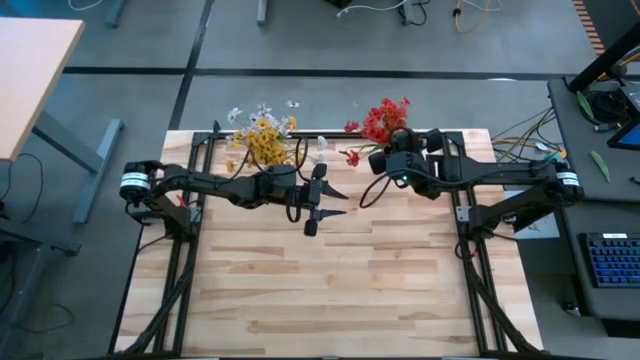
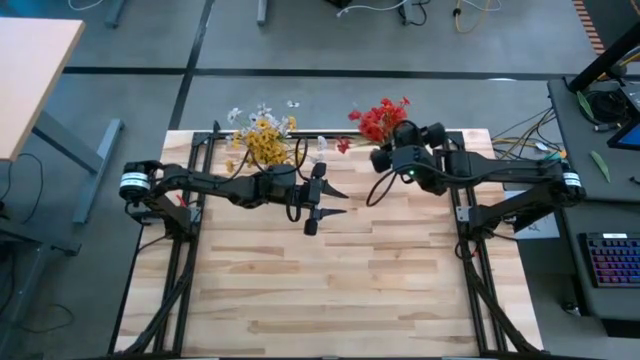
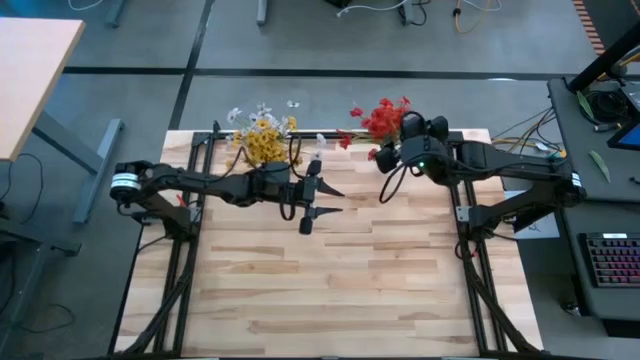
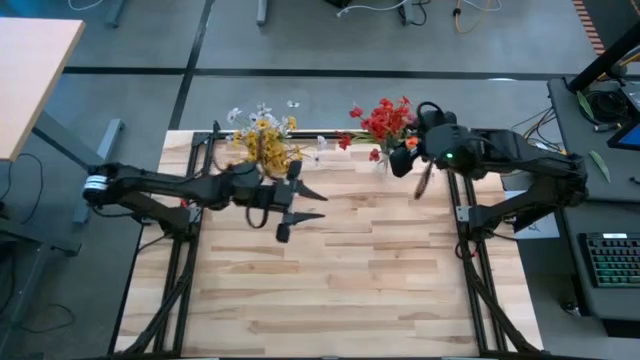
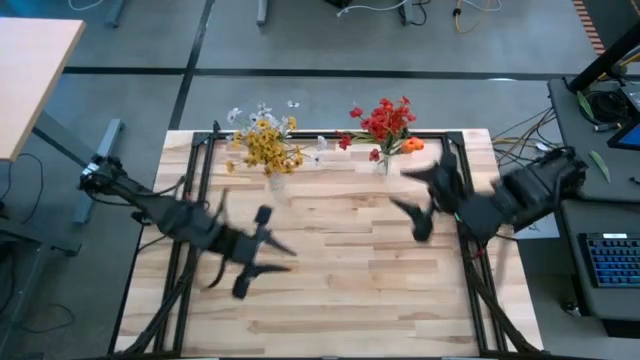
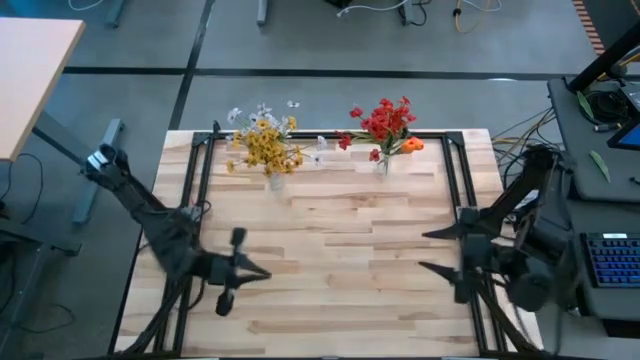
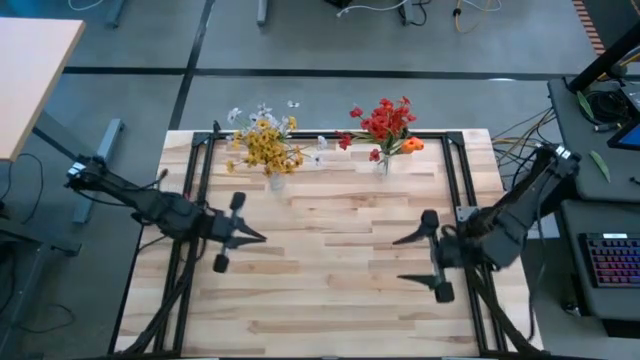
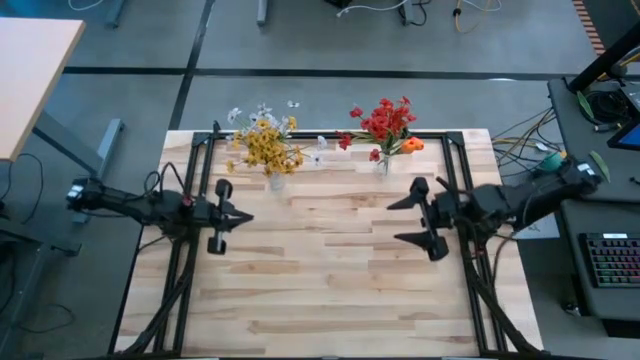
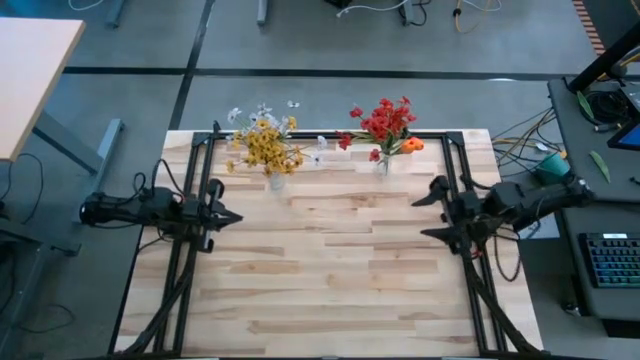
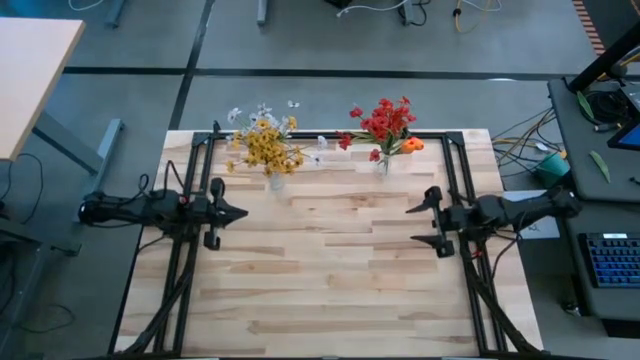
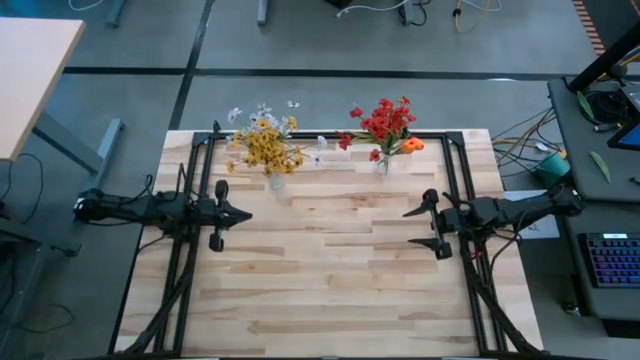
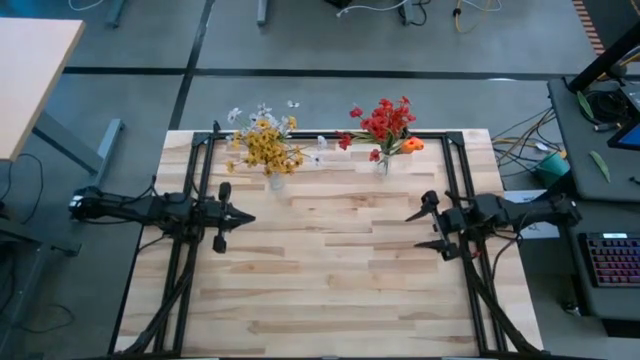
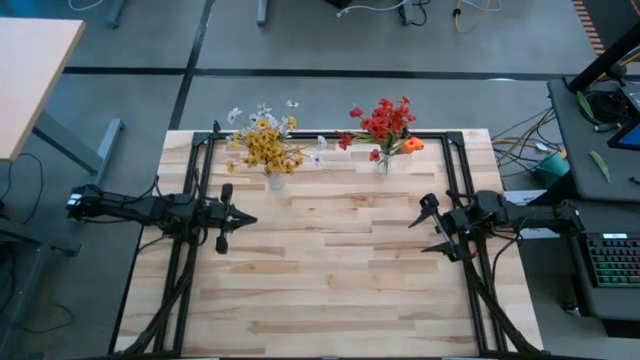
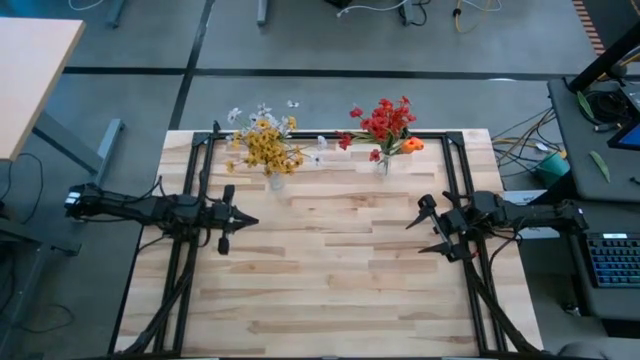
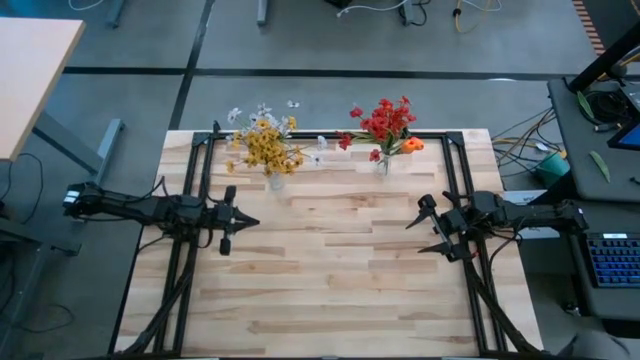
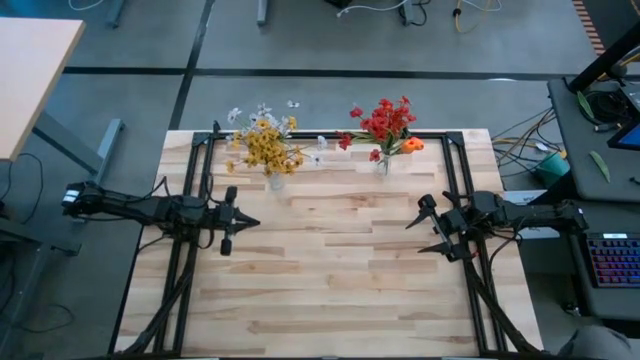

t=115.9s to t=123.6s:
Task: Sort flowers into vase by color
Return to Home Position

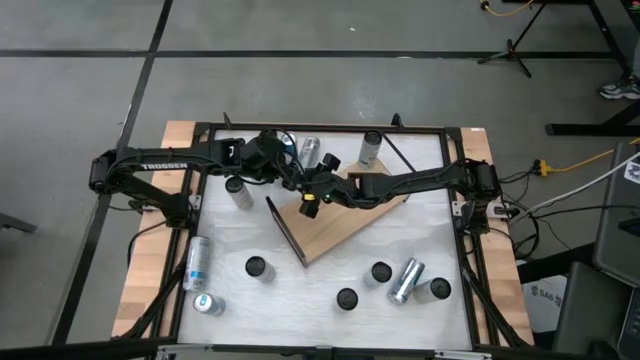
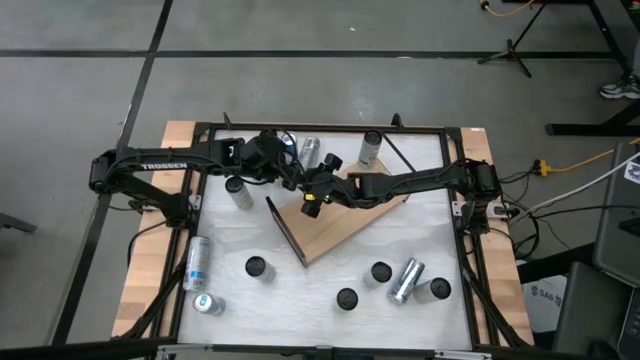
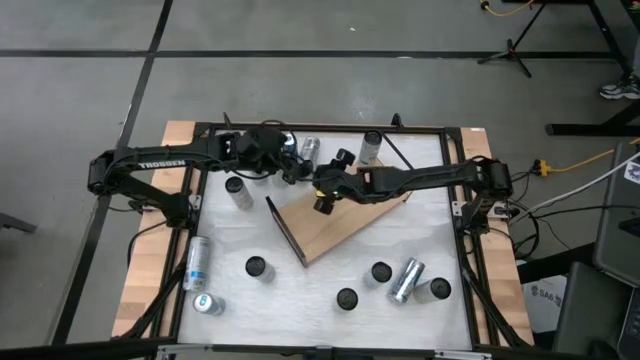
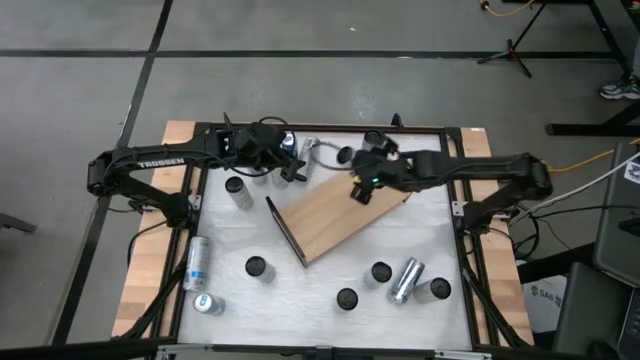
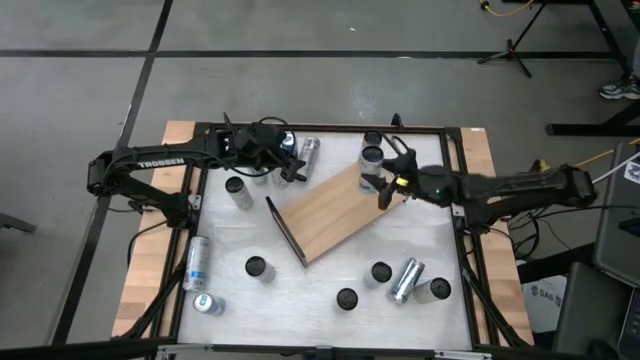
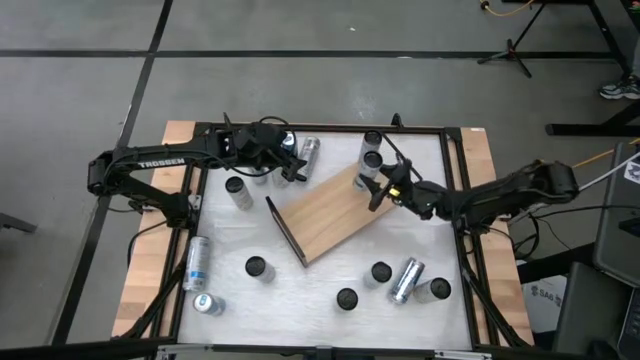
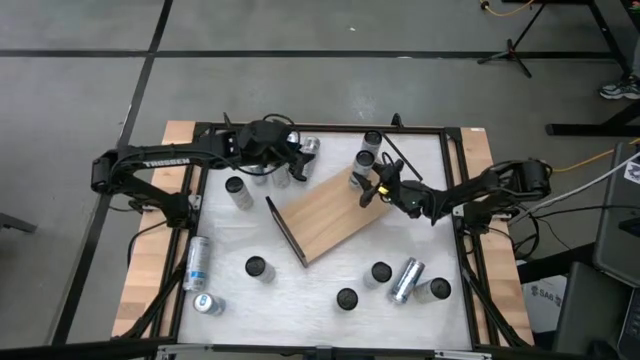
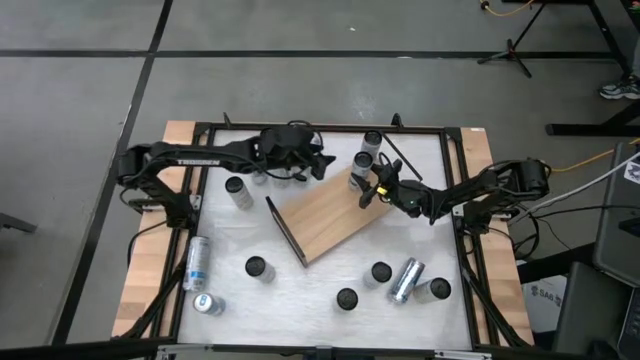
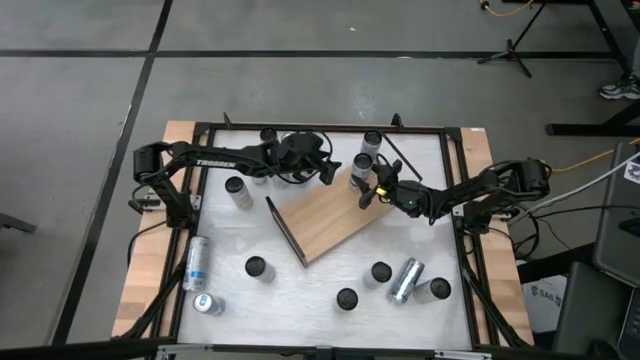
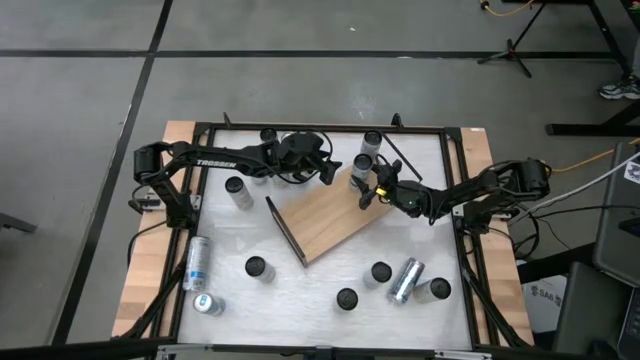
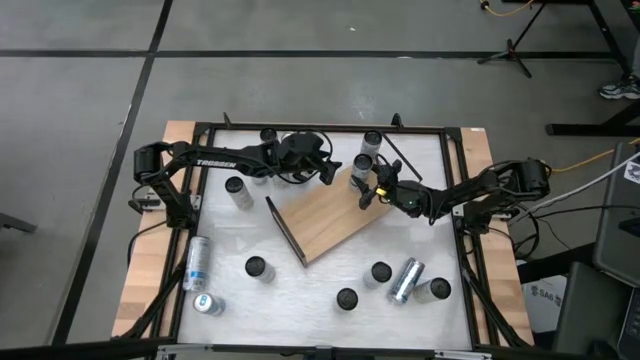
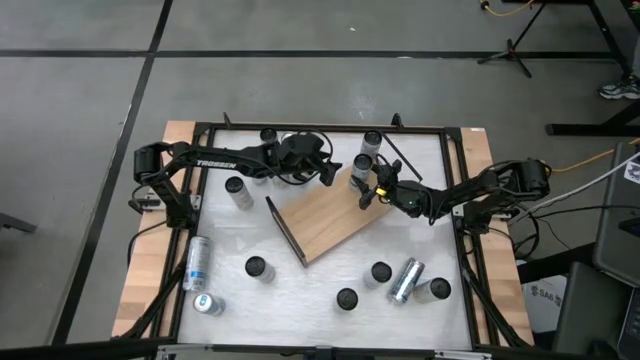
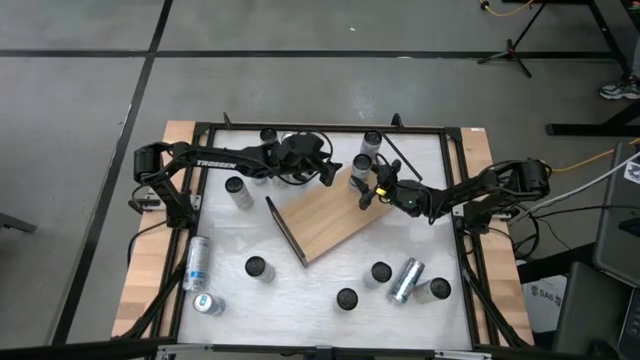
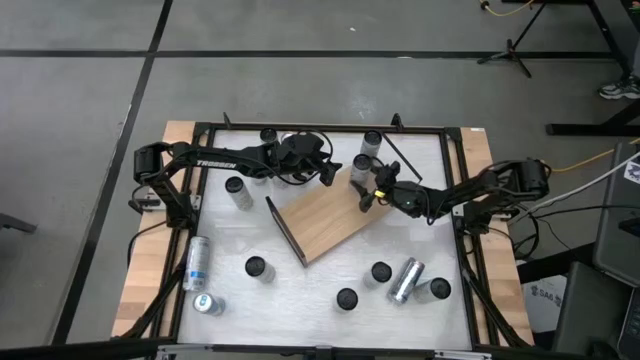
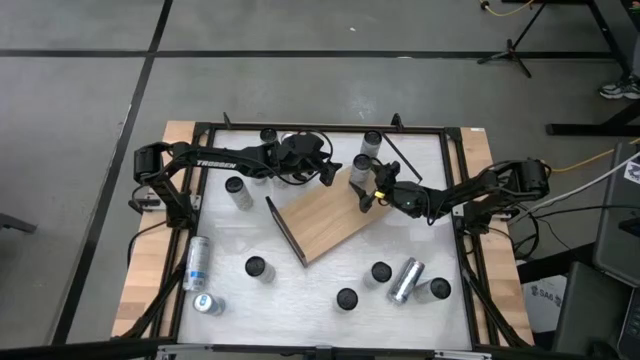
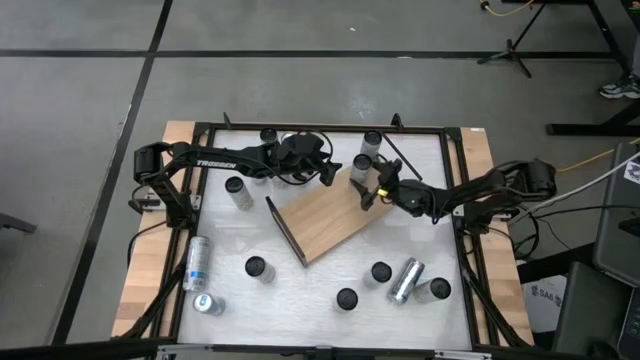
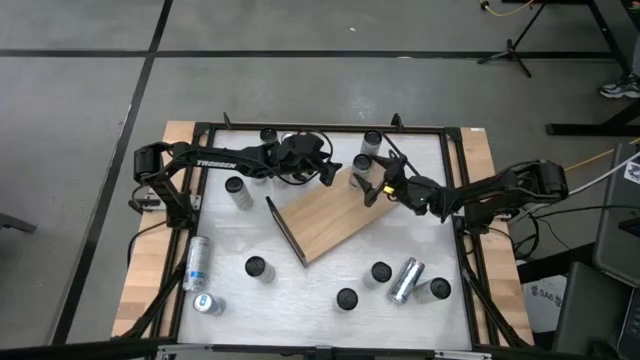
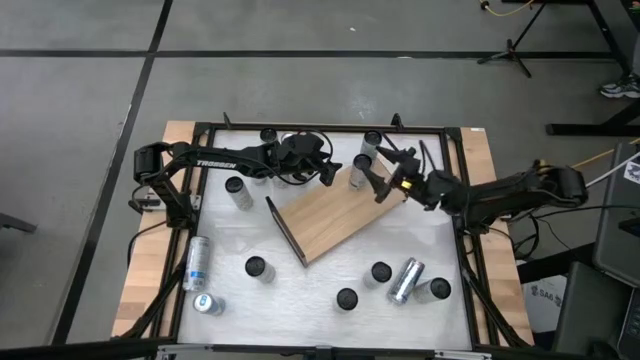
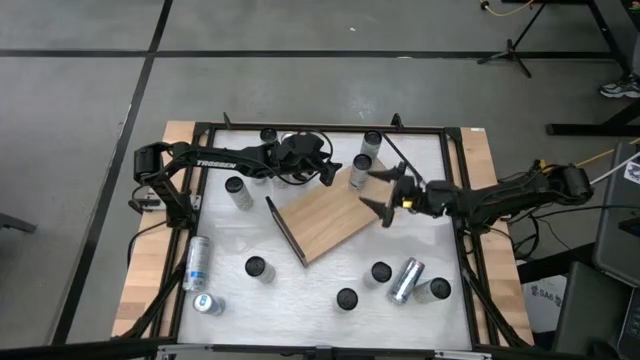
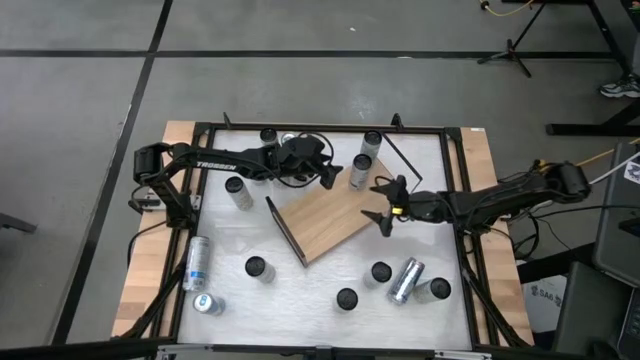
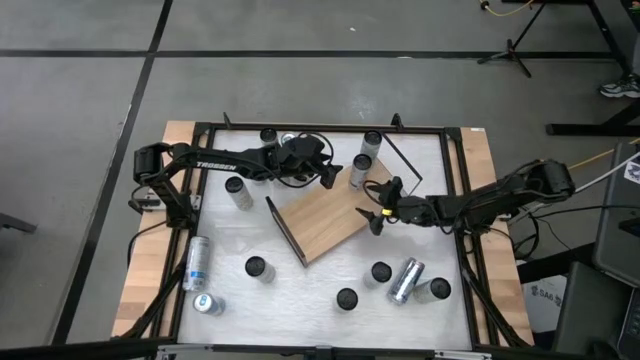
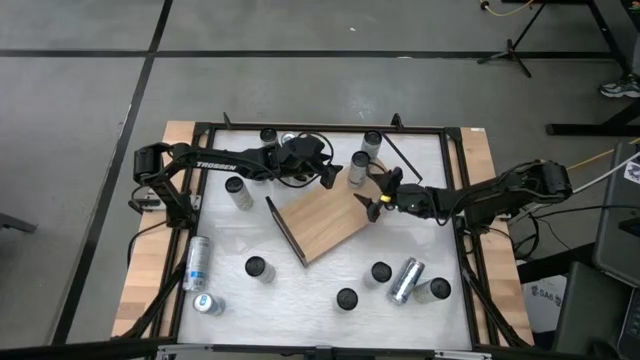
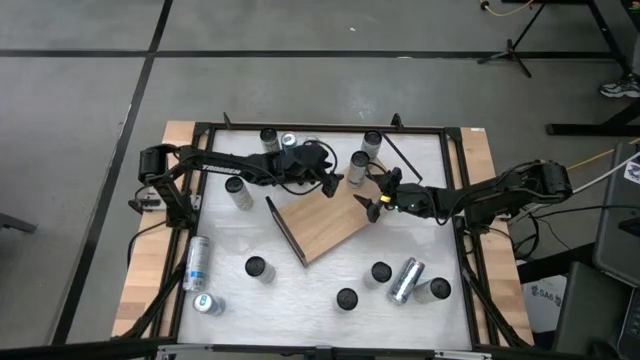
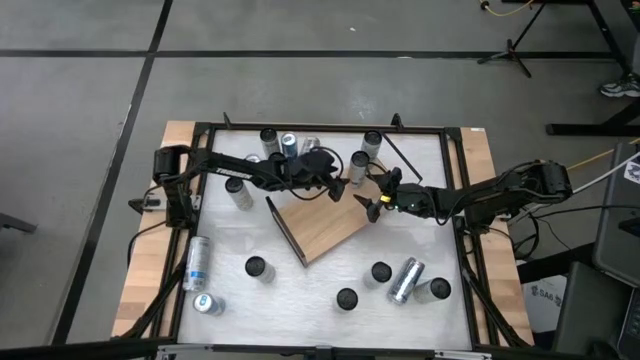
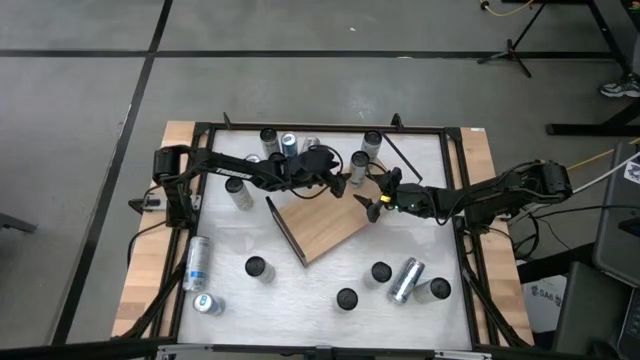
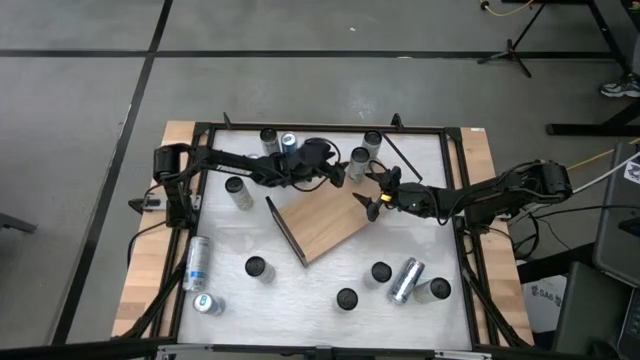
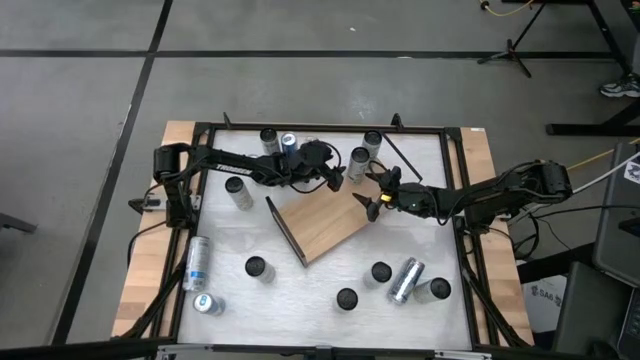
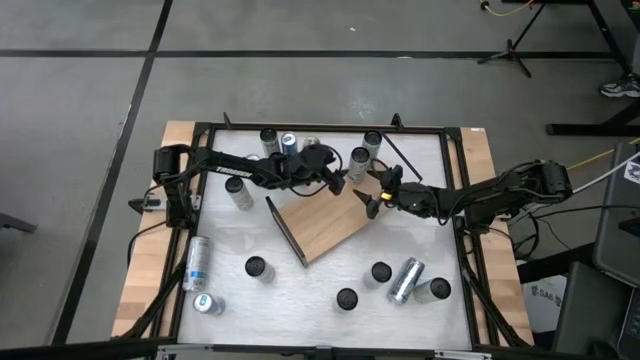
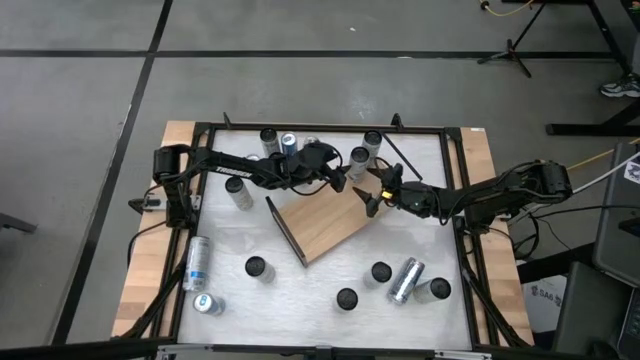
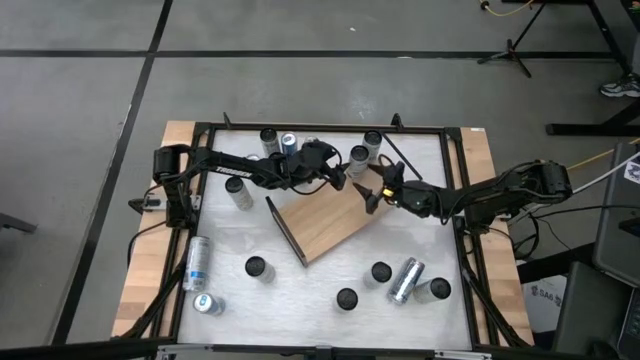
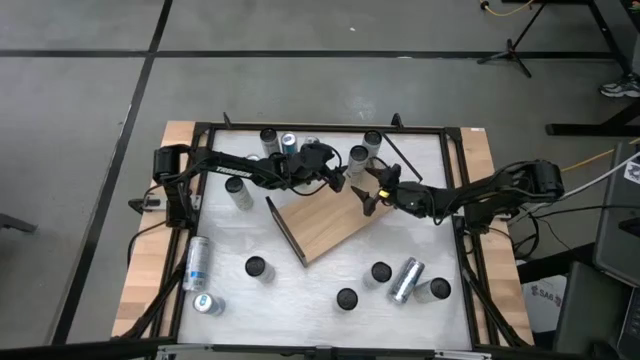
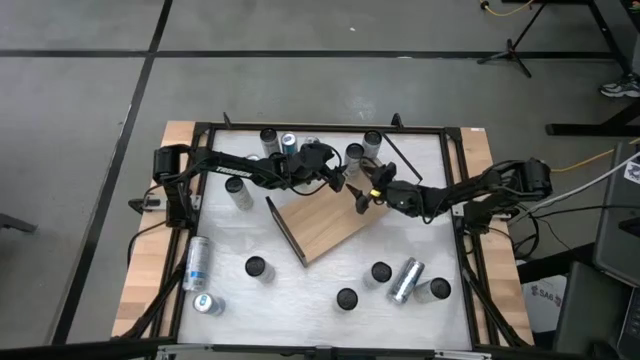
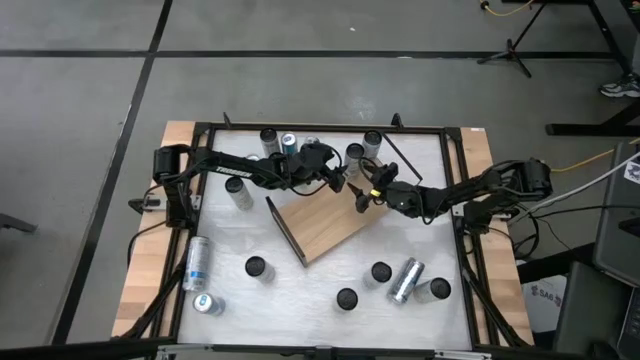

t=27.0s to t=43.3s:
Task: Place canned beverage on shelf
Put the white blue soda can on the shelf
